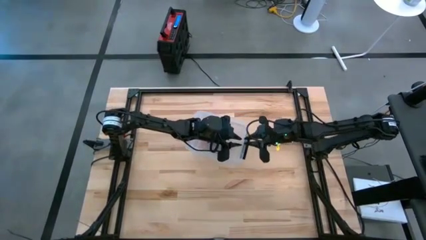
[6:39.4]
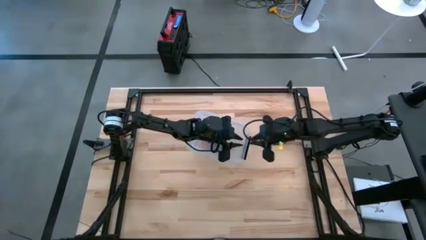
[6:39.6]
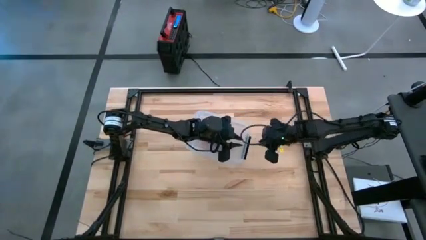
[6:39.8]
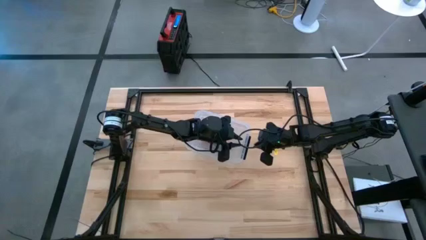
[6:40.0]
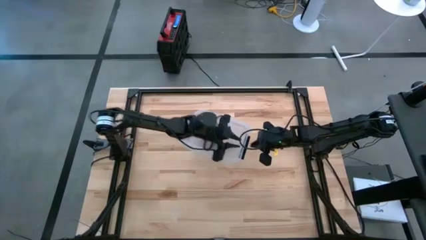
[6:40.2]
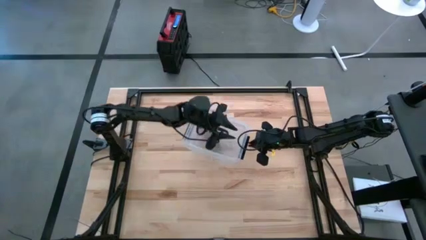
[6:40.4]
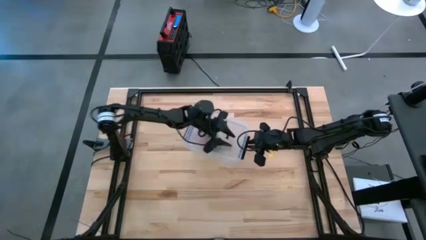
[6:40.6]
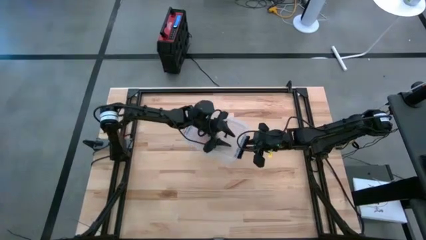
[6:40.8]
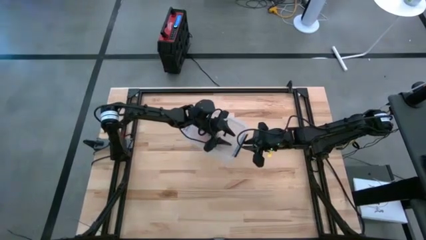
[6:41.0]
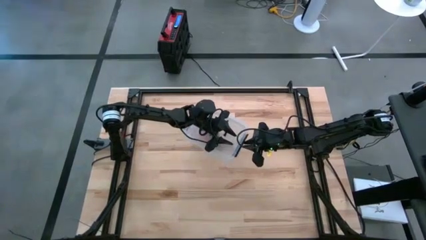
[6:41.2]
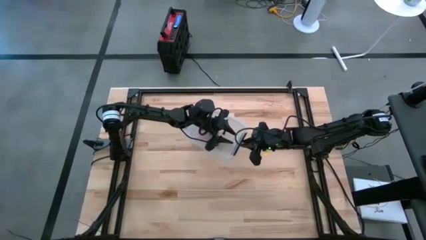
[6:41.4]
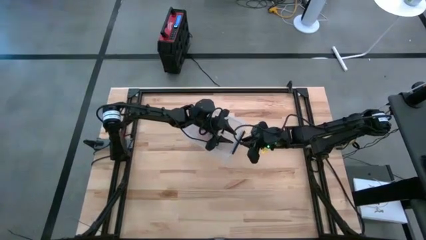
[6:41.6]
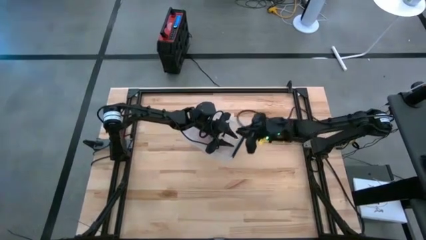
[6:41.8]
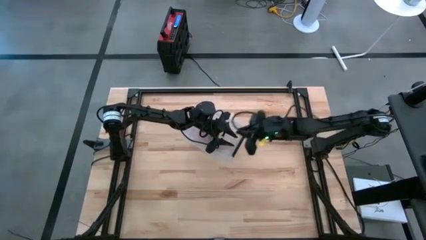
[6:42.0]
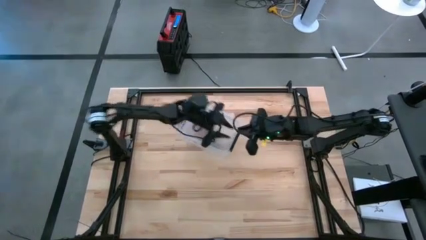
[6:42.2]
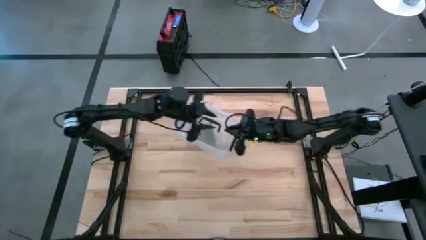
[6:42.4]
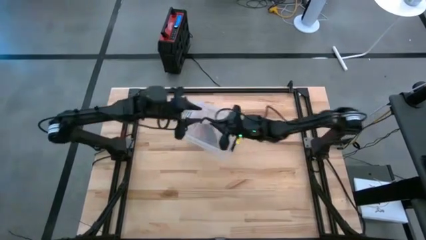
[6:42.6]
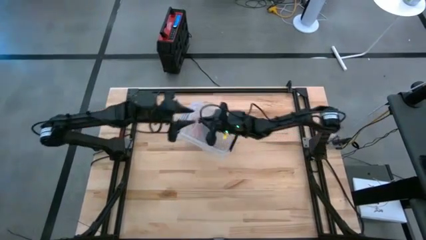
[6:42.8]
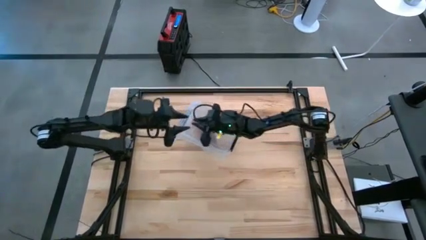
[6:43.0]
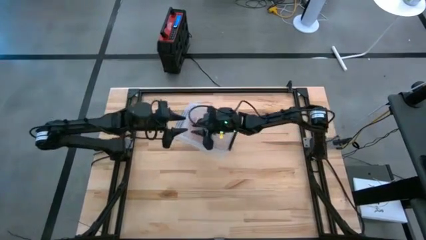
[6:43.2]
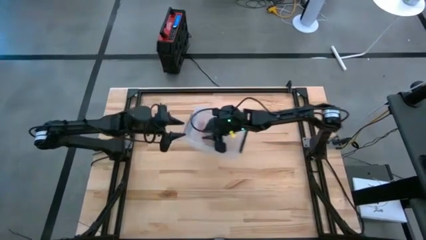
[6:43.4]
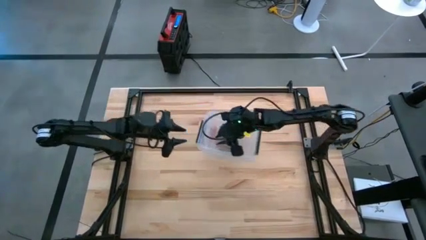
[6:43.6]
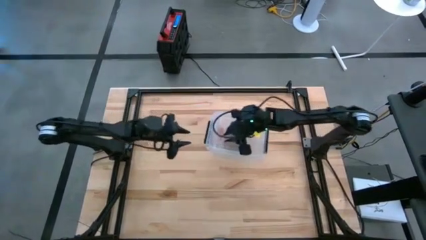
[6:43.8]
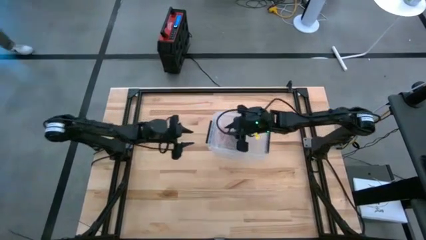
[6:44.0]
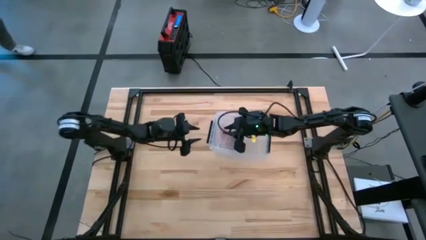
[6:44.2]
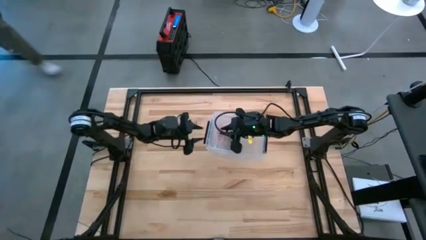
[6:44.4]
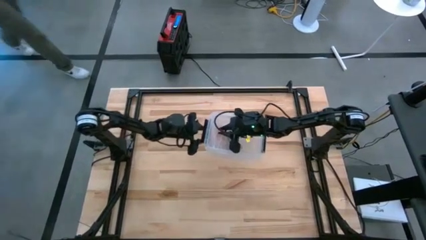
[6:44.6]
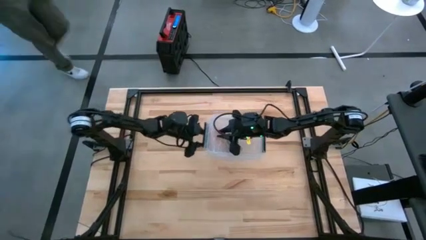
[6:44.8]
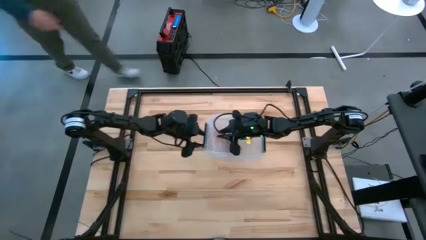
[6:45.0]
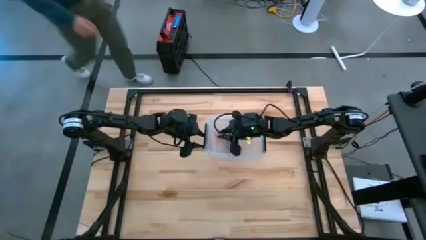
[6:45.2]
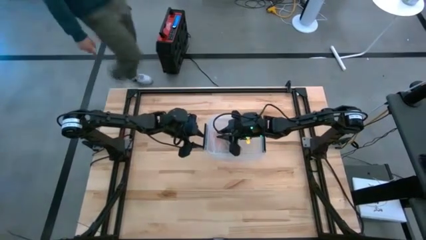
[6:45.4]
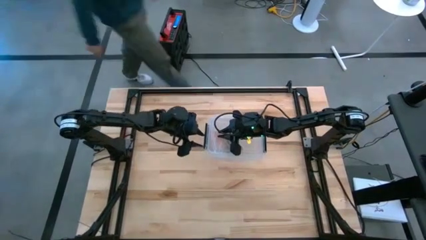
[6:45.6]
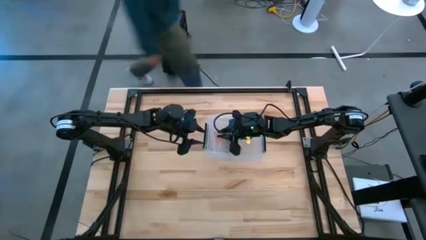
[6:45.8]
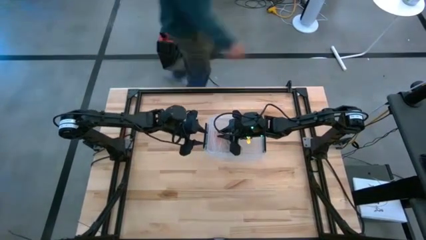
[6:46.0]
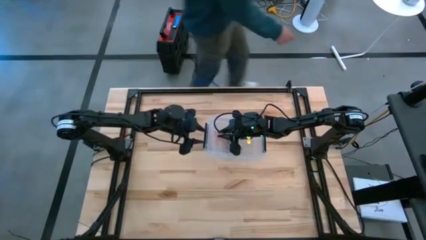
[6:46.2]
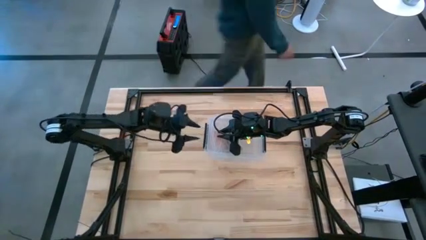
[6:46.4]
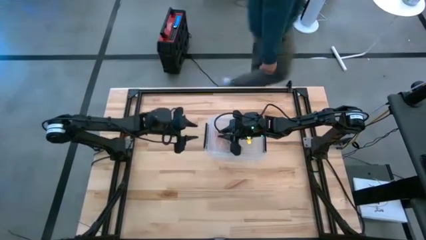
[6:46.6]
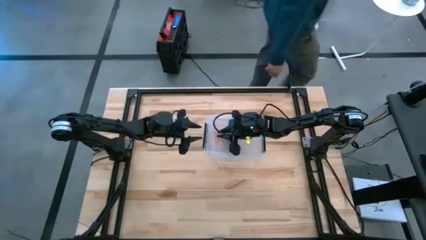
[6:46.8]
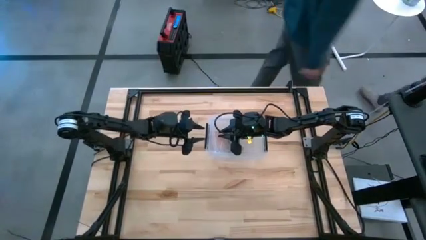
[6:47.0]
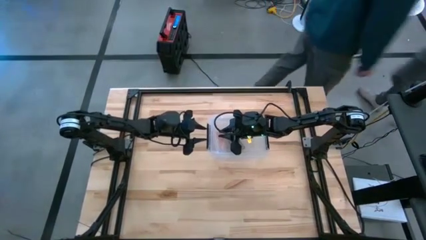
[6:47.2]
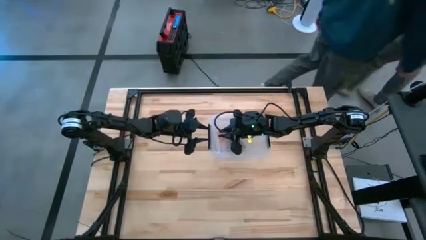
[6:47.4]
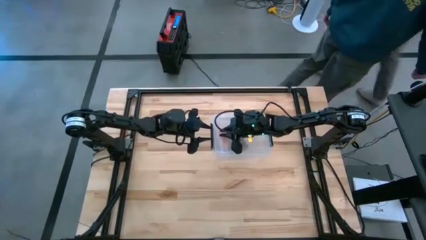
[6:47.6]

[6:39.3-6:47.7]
Task: Roll bandage
Close the transparent container

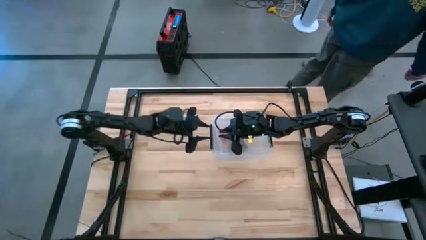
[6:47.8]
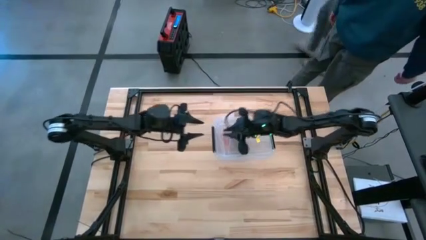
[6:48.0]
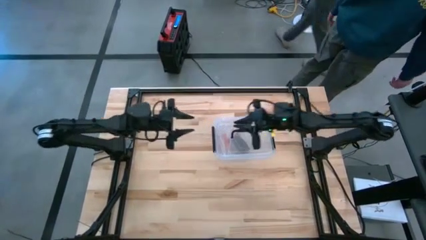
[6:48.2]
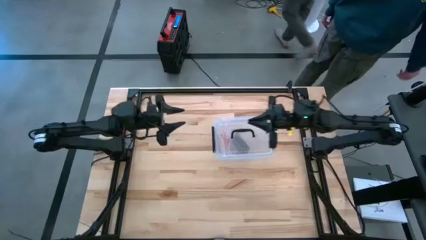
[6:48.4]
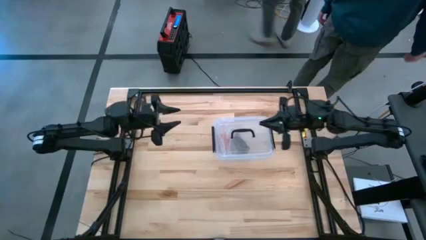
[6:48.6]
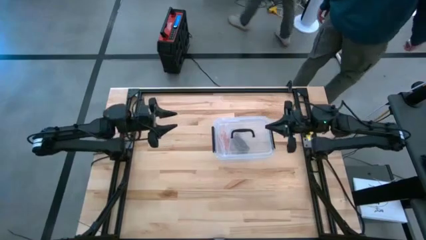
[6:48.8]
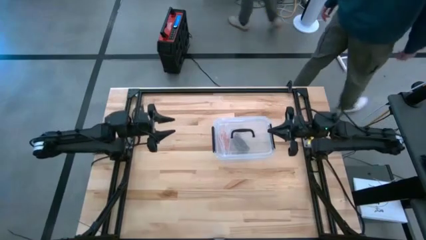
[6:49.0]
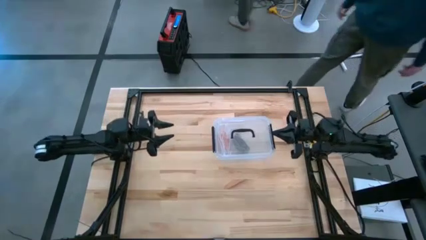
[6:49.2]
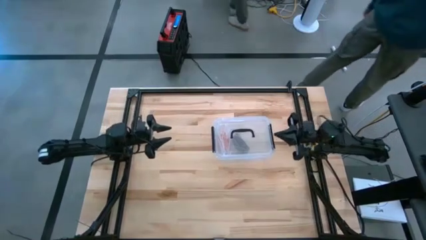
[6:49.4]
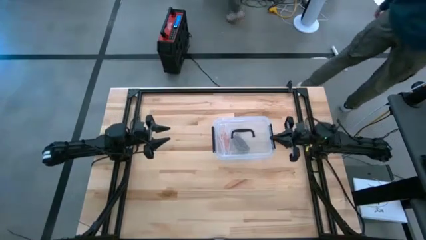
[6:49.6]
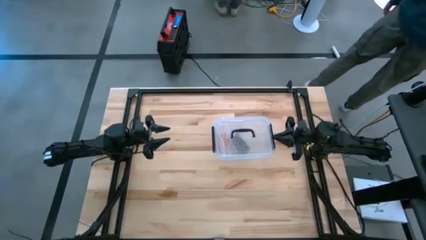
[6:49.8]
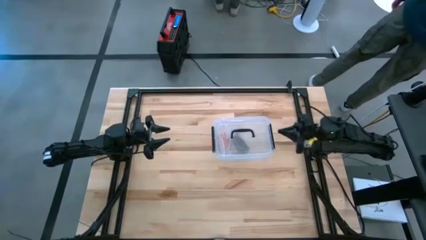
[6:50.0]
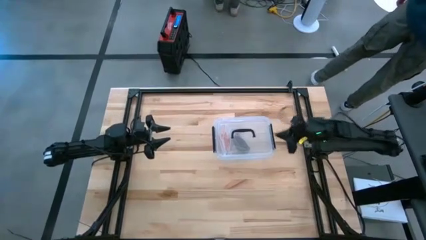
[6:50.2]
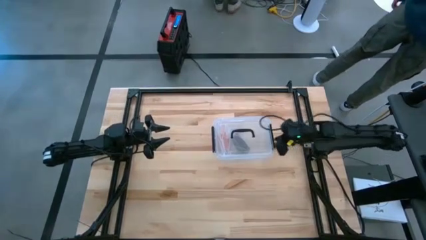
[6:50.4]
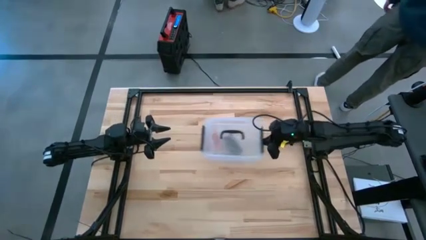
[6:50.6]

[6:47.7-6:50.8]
Return to Home Position

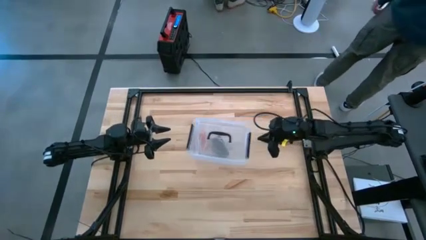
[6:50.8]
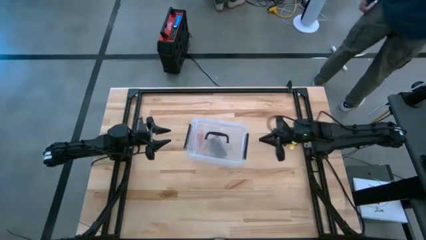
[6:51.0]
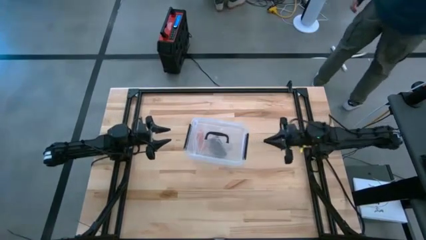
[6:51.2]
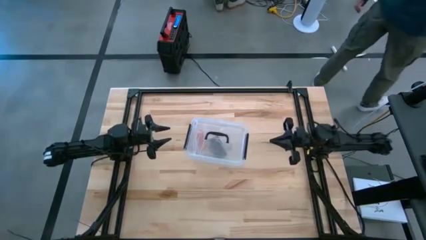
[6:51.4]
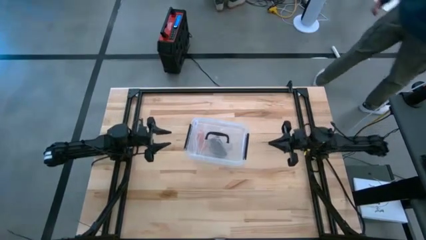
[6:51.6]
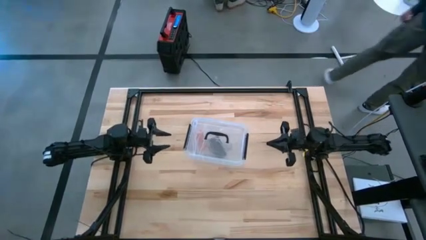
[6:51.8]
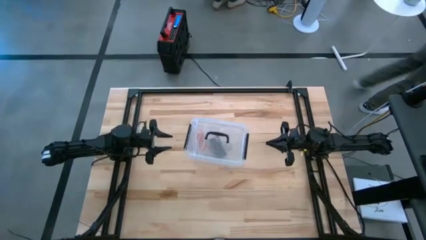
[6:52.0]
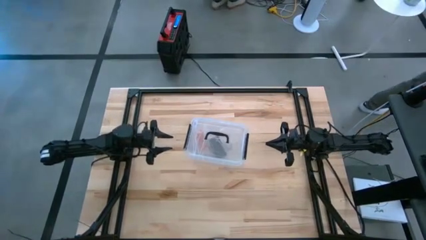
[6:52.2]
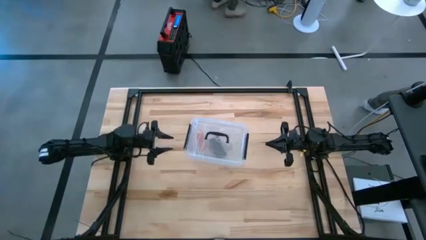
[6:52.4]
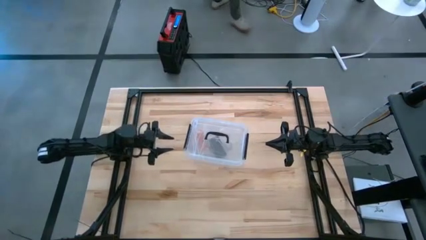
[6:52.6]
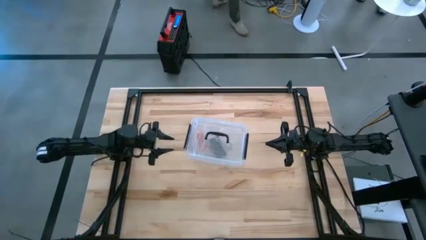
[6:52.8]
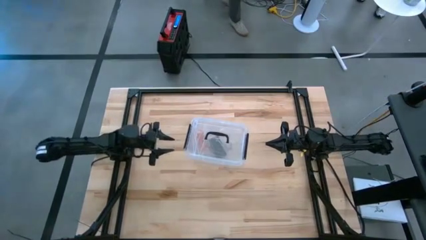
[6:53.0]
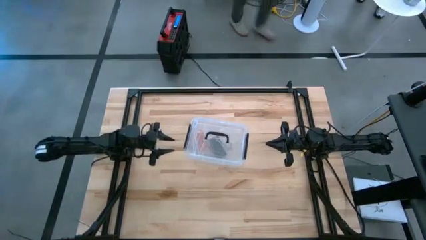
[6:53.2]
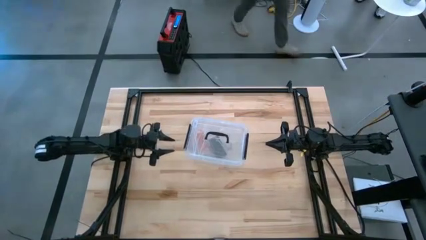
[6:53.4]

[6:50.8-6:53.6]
Return to Home Position
